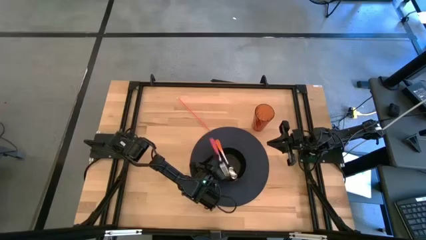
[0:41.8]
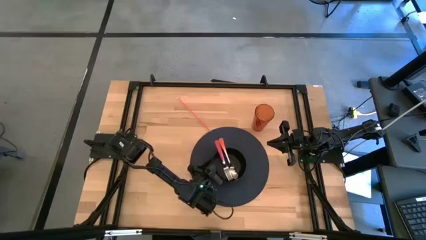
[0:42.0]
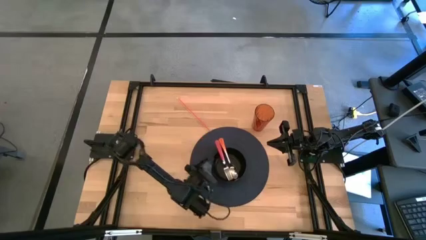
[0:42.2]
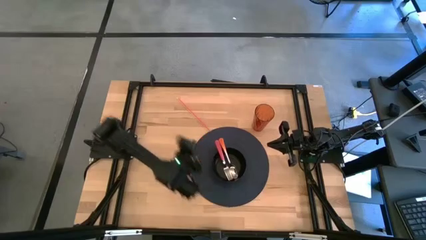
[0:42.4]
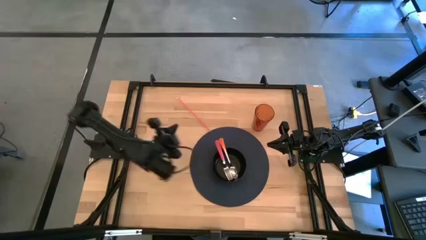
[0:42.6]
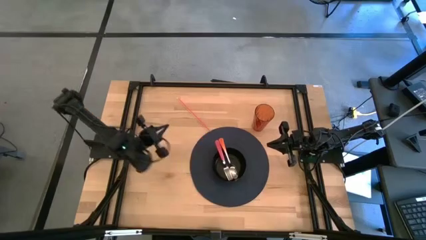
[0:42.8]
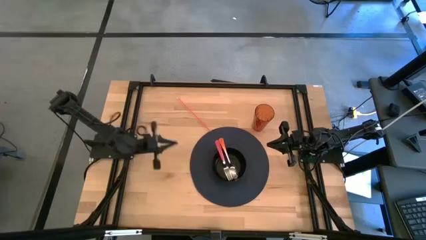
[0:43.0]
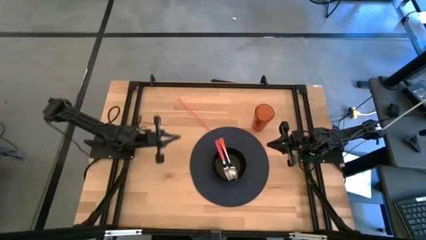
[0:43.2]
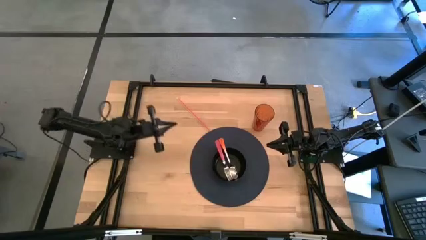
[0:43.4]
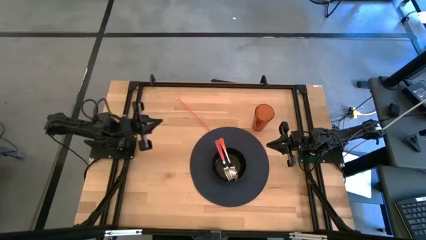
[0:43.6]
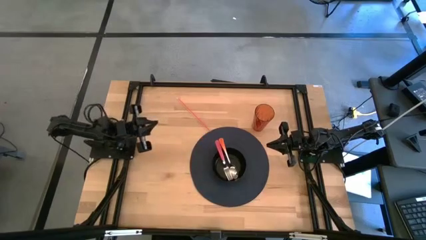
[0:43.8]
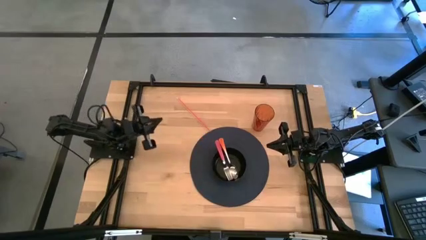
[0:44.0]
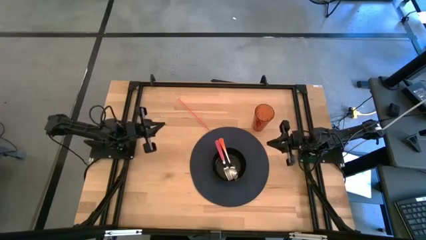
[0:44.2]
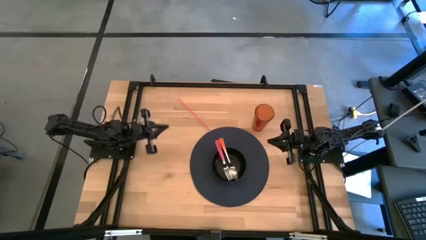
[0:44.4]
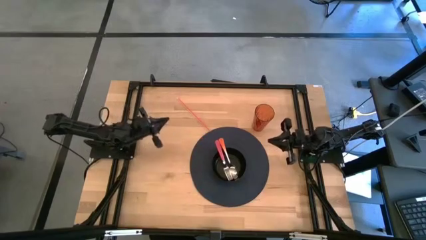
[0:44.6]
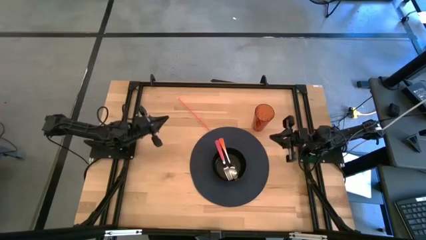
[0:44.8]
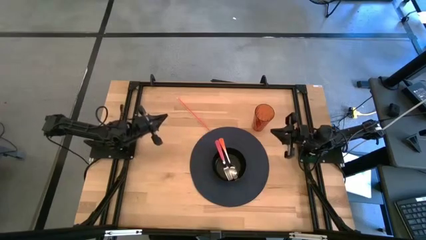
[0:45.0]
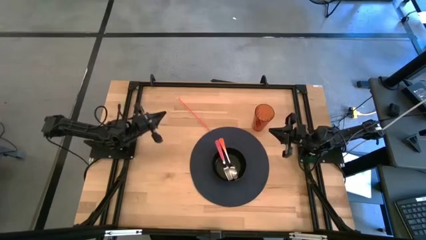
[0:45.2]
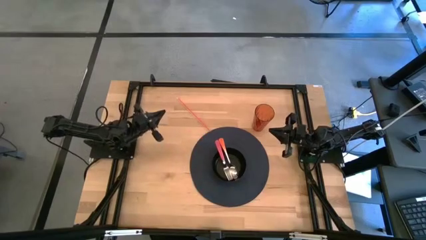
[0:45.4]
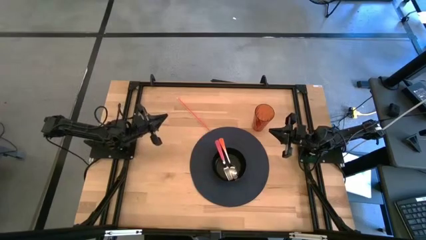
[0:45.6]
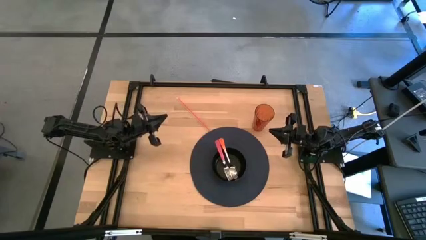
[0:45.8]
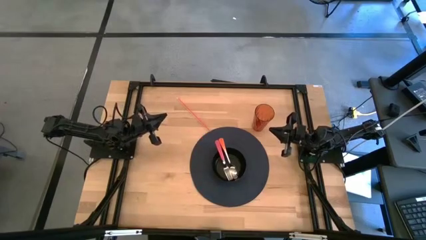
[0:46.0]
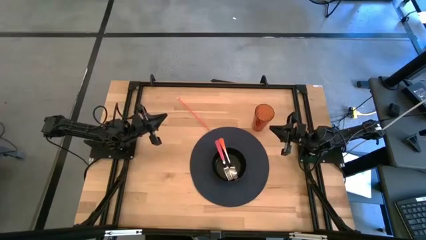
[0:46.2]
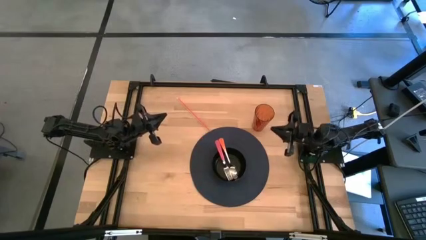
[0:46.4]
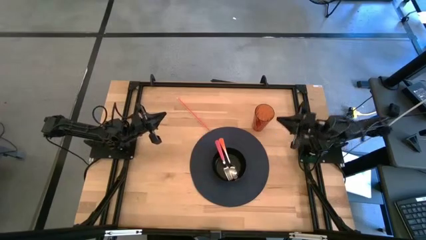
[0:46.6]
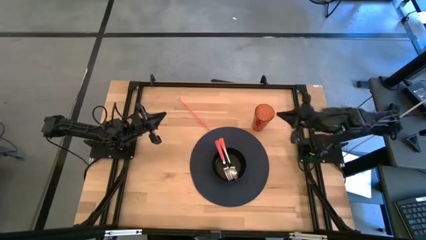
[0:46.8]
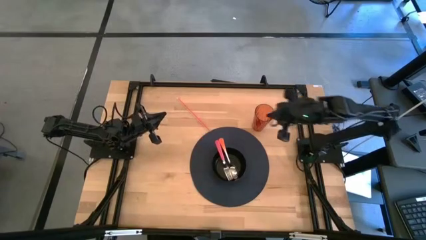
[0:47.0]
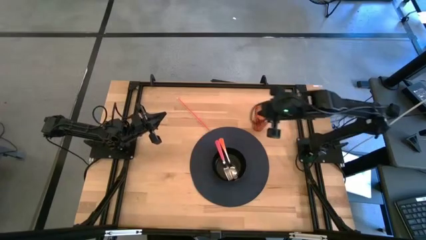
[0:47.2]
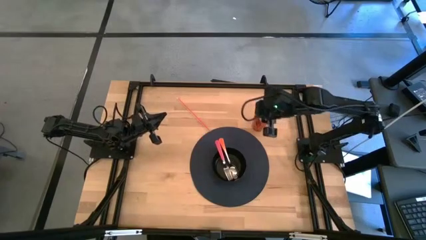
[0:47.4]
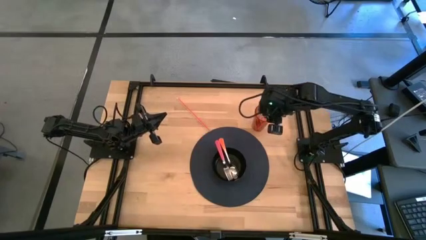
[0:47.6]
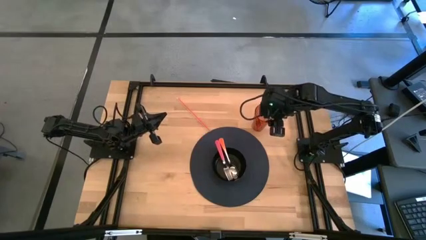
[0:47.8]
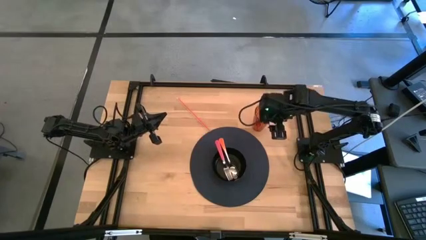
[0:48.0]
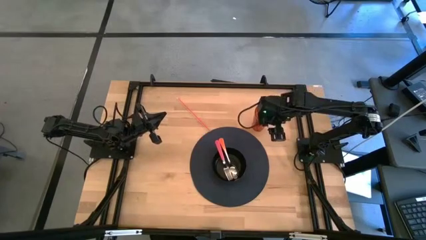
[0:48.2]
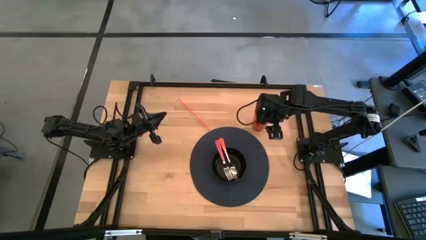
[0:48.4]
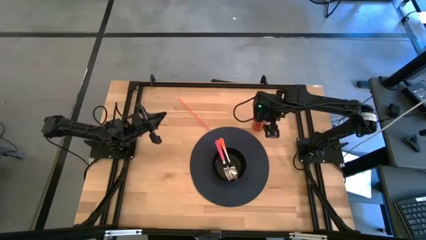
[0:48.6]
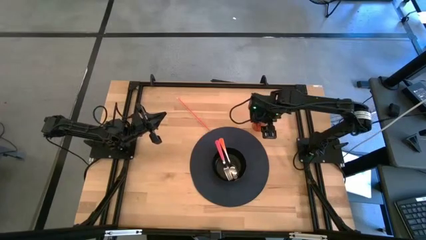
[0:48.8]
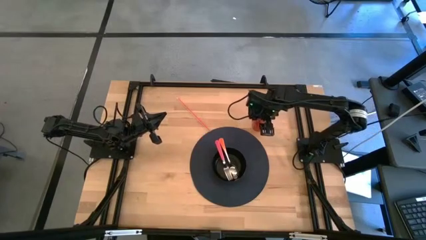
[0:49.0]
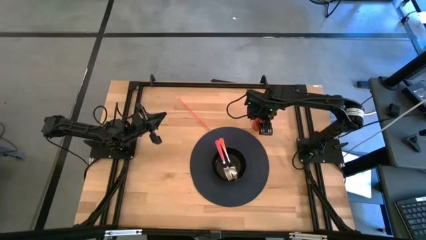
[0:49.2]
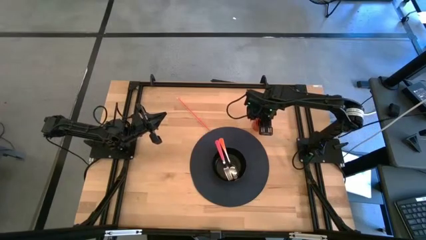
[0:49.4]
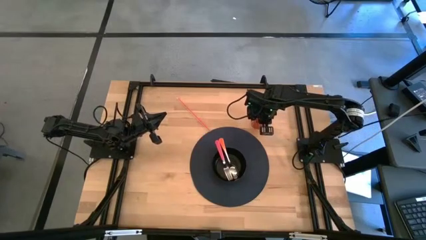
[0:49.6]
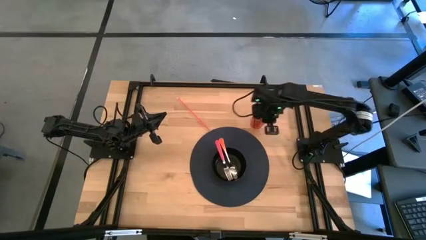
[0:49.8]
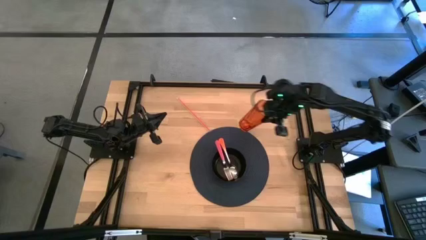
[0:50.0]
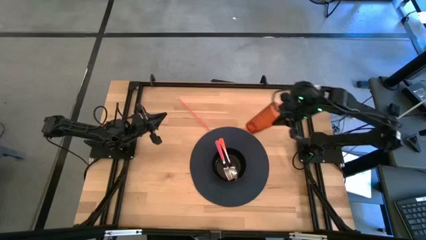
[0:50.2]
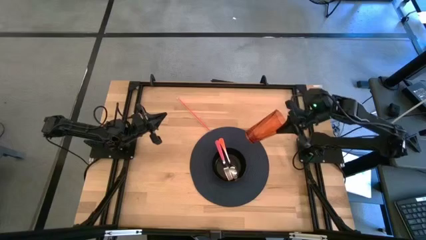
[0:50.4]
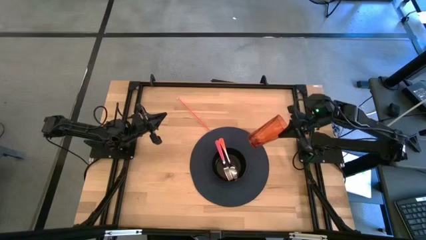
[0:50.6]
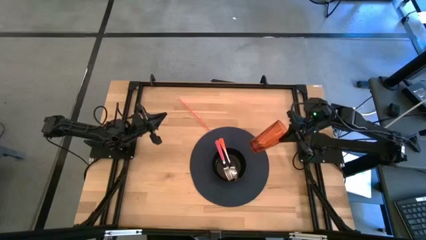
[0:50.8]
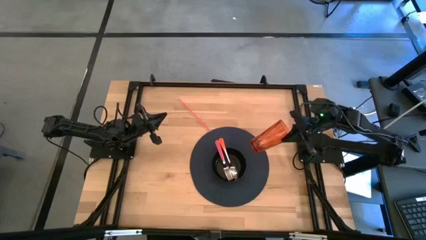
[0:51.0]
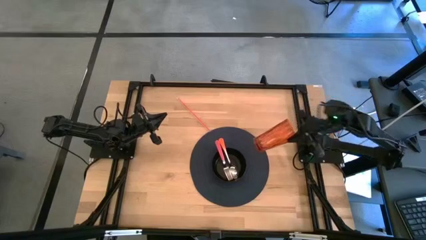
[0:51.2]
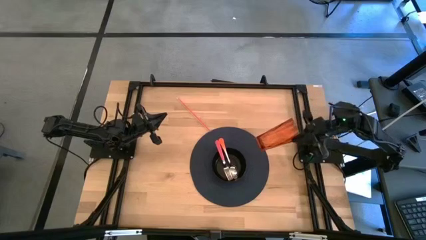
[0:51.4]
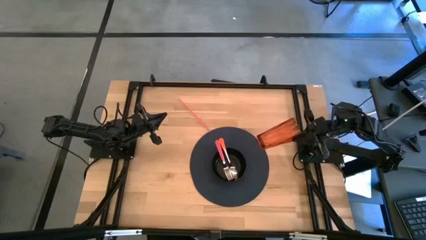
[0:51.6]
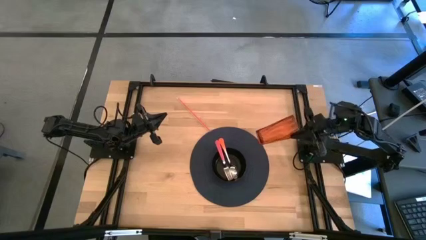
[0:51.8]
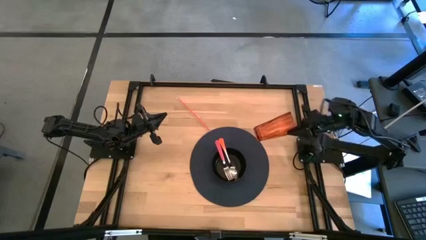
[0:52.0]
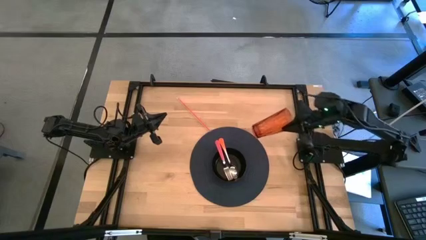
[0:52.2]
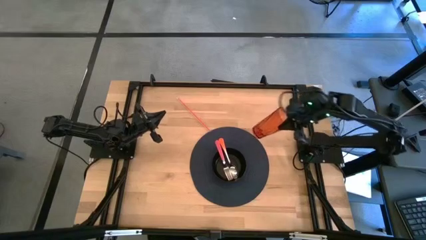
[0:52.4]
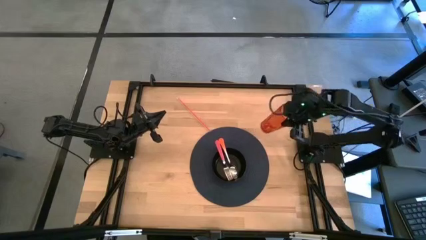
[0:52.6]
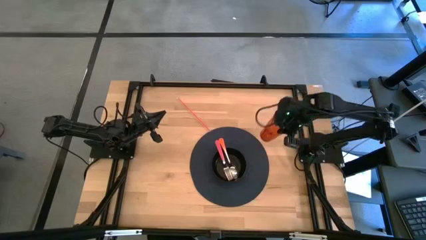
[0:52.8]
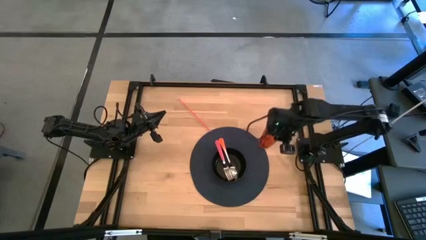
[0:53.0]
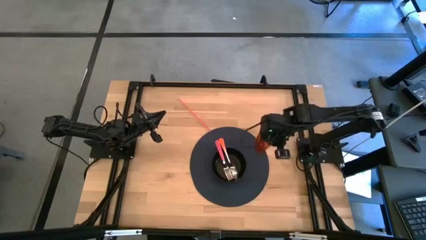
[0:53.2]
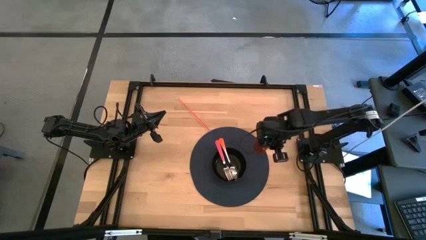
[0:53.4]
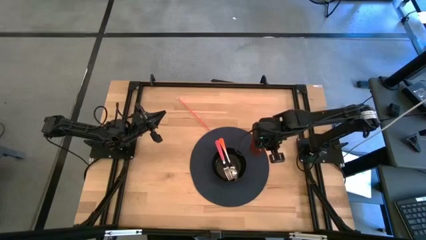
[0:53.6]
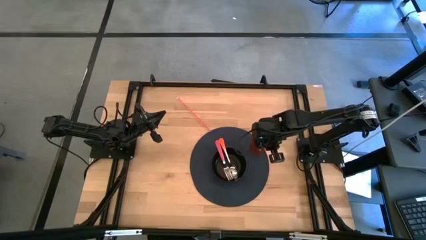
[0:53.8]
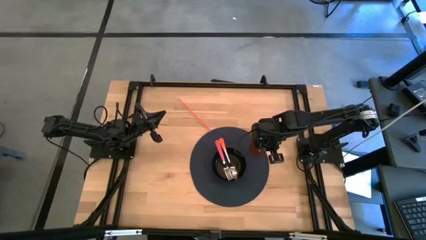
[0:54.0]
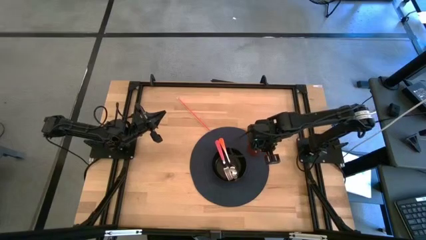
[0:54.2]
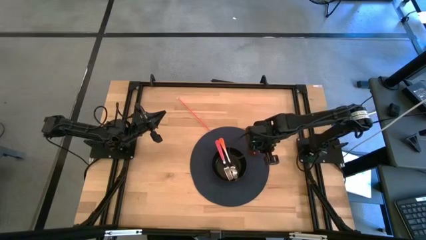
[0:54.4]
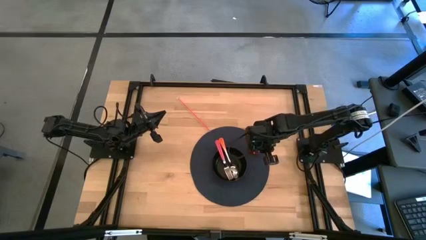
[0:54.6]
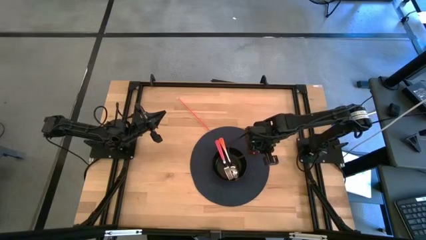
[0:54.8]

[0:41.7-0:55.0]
Task: Pick & Place Utensil
Put the orange cup on the black mat to the top right of the black bowl

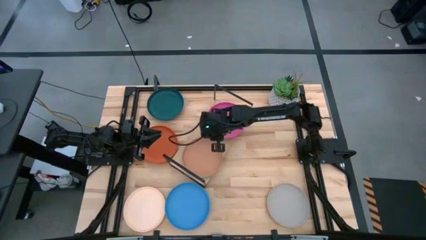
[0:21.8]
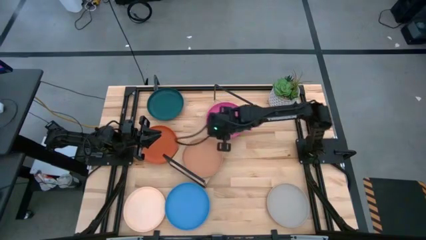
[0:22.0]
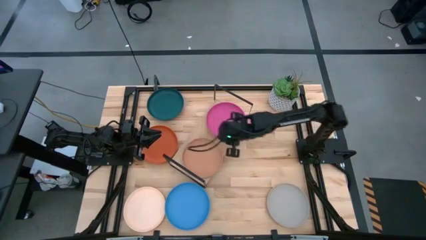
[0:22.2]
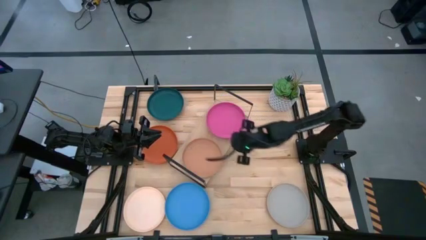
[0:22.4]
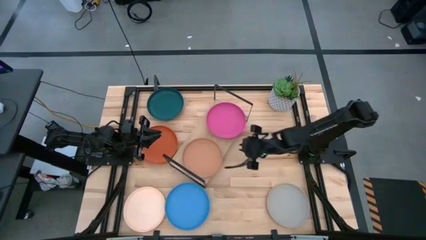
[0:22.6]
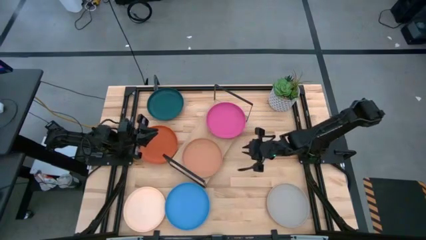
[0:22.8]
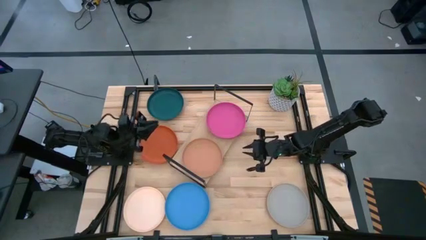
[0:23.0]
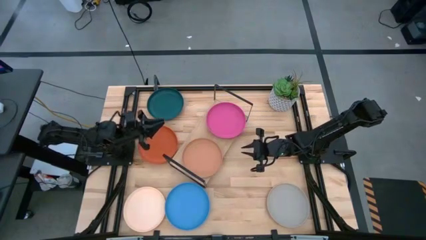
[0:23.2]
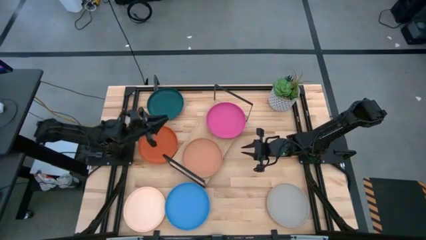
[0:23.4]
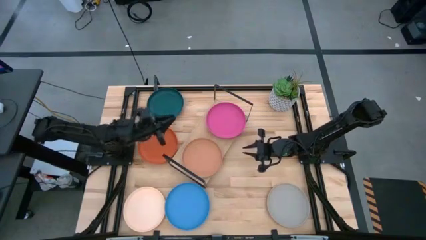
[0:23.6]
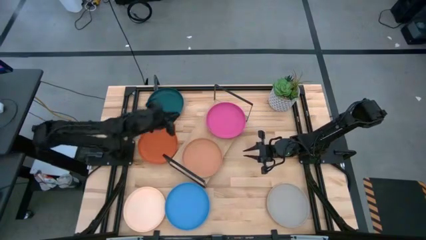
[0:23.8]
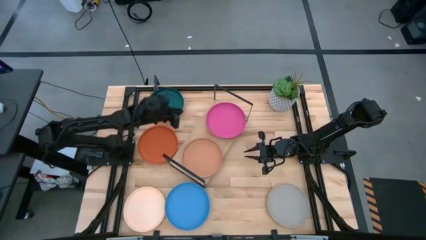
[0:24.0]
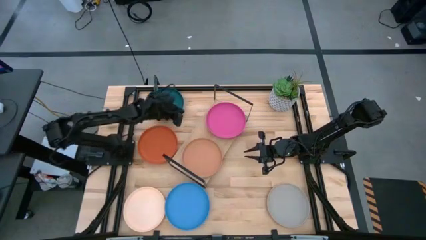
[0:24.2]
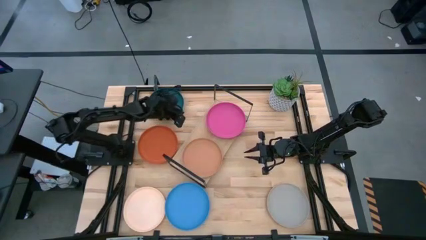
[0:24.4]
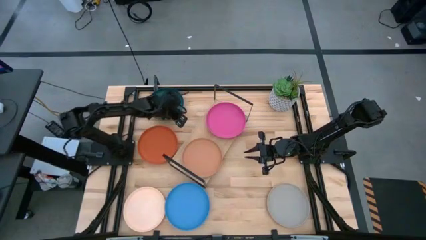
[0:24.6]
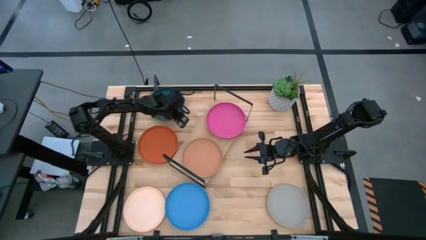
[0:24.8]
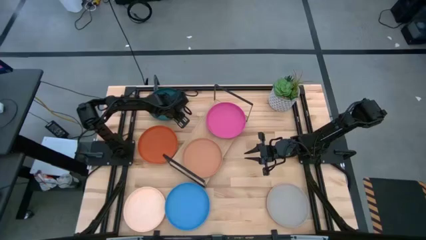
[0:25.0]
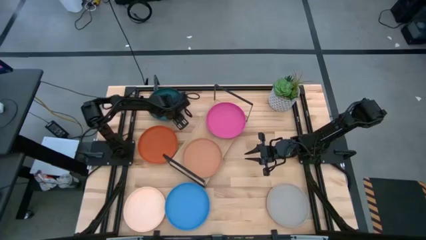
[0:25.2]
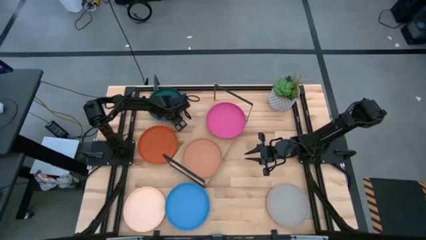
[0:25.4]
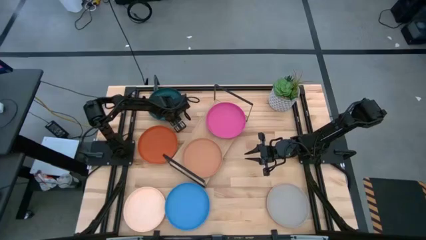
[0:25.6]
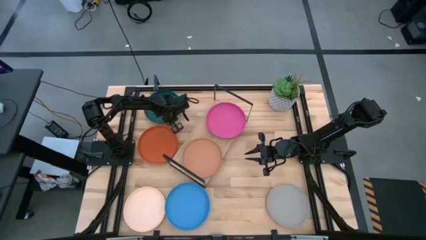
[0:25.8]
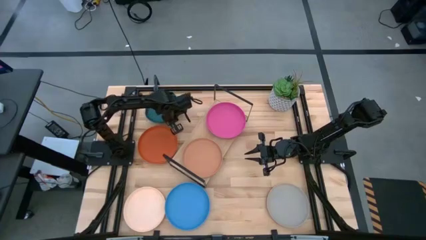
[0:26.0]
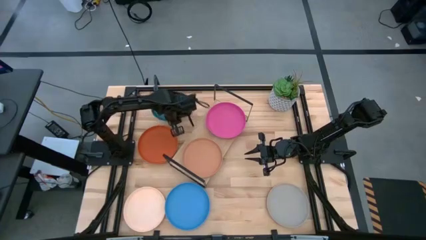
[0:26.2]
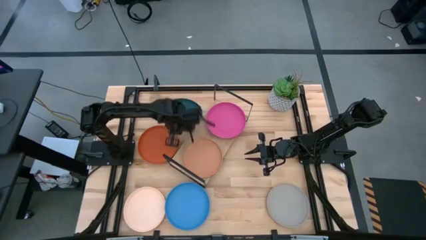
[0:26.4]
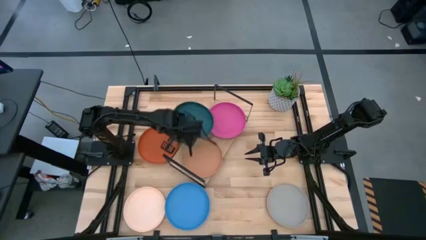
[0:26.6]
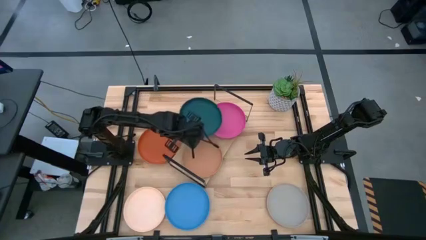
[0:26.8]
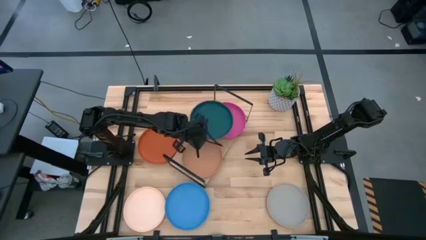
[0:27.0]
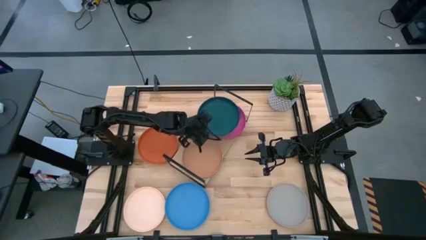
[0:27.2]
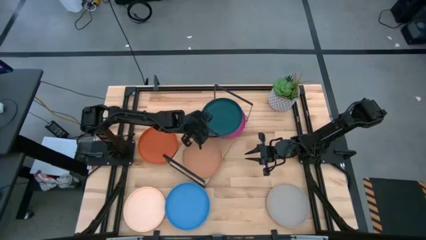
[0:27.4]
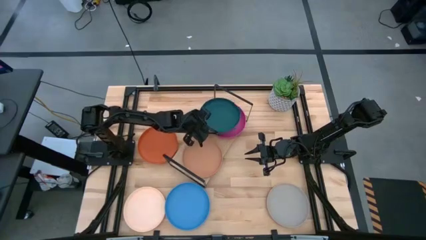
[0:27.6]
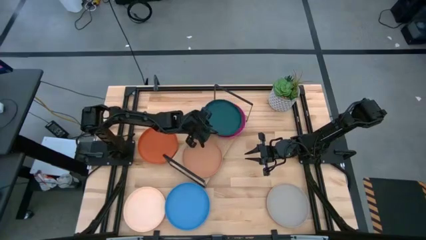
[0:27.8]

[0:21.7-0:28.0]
Task: Place and stack plates onto a shelf
Stack the green plate on top of the pink plate
